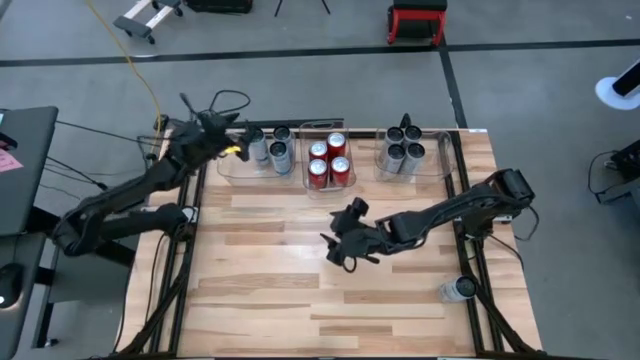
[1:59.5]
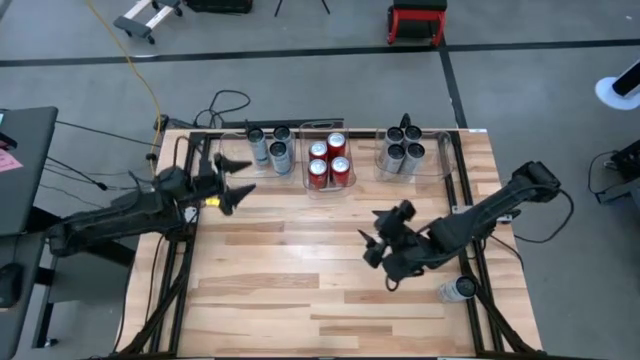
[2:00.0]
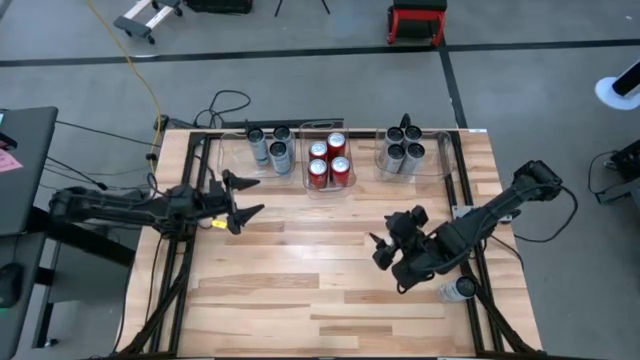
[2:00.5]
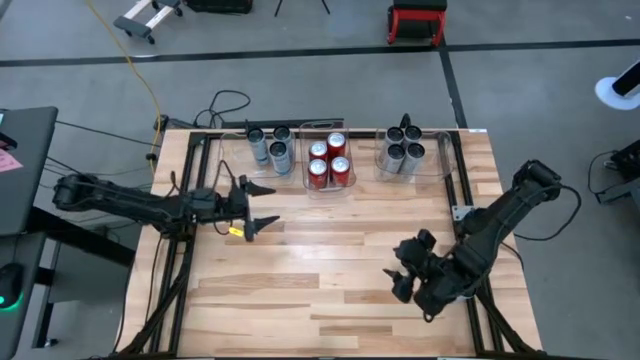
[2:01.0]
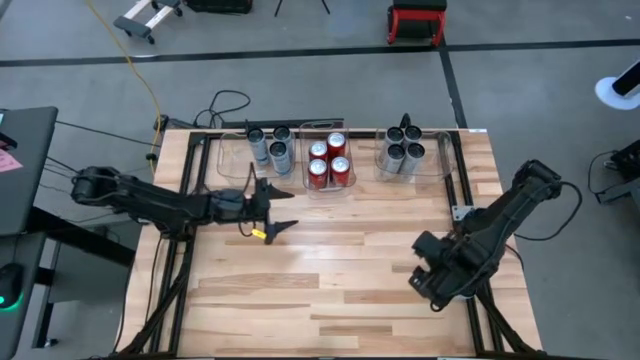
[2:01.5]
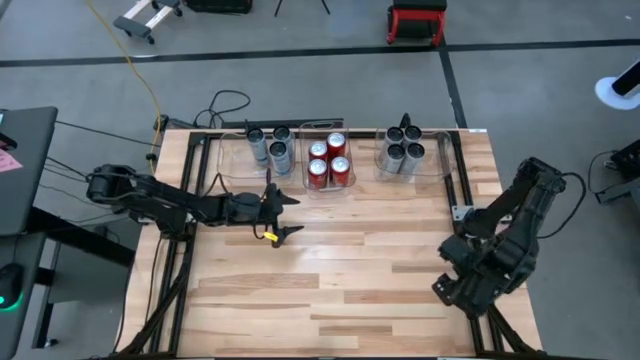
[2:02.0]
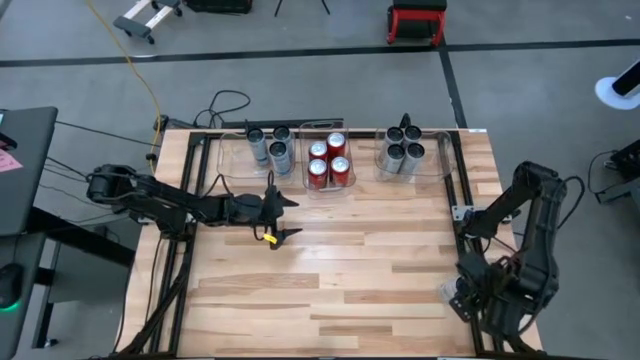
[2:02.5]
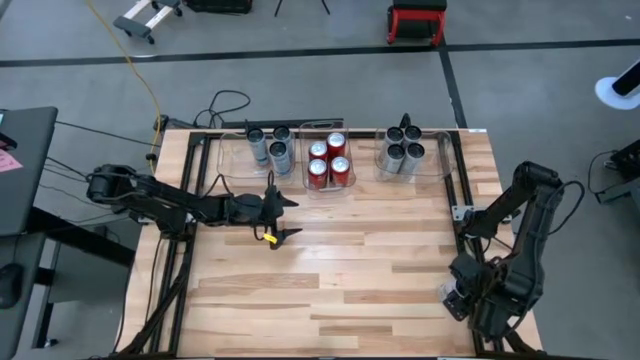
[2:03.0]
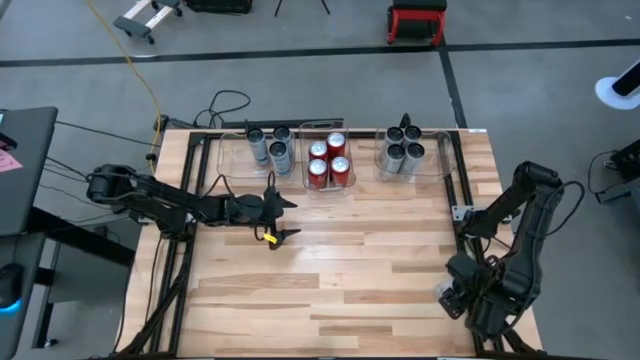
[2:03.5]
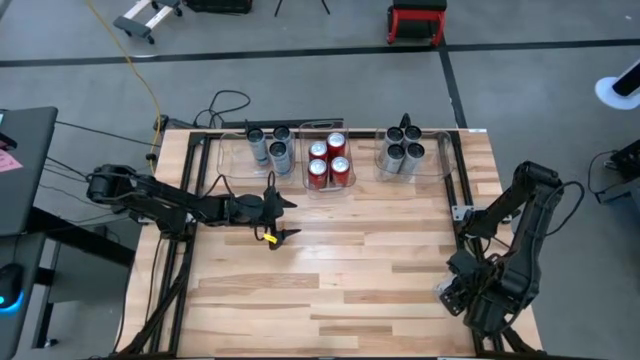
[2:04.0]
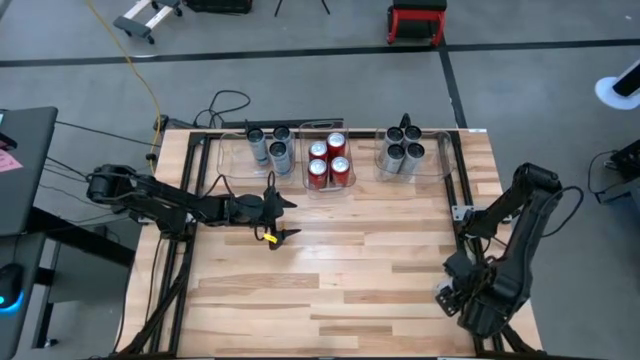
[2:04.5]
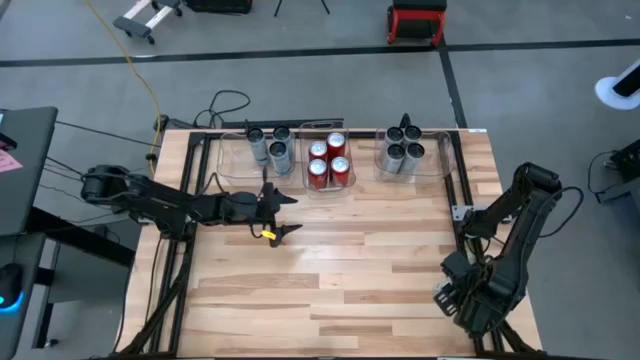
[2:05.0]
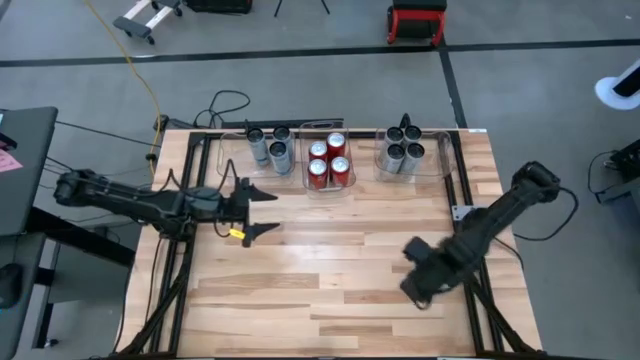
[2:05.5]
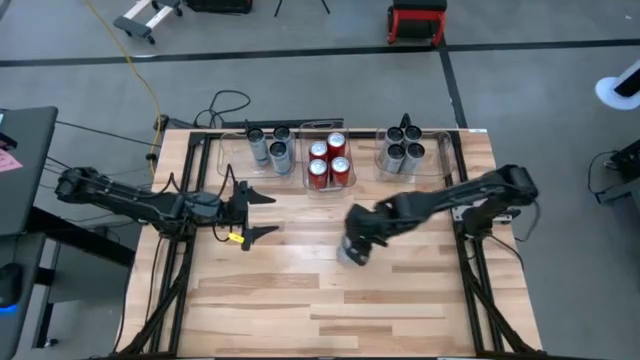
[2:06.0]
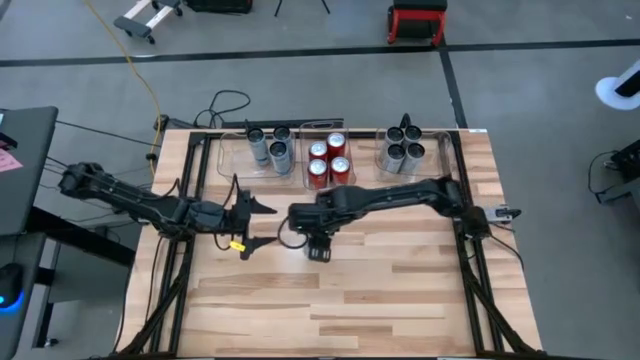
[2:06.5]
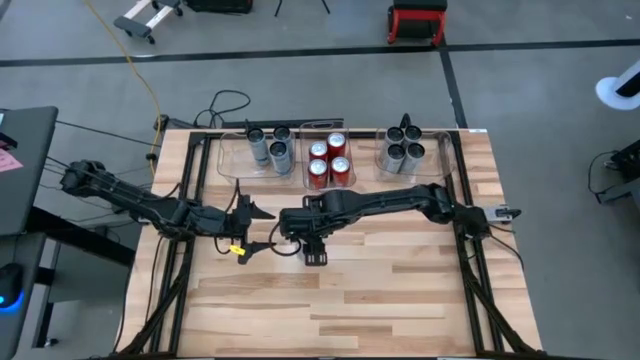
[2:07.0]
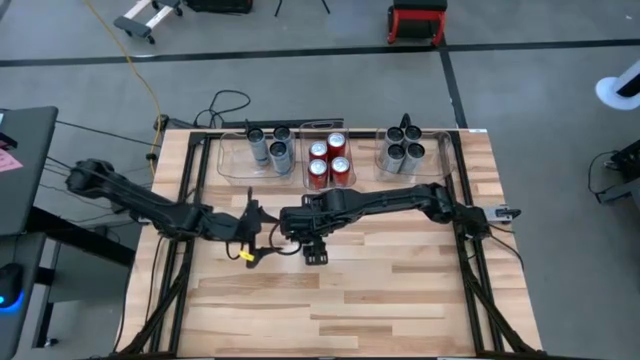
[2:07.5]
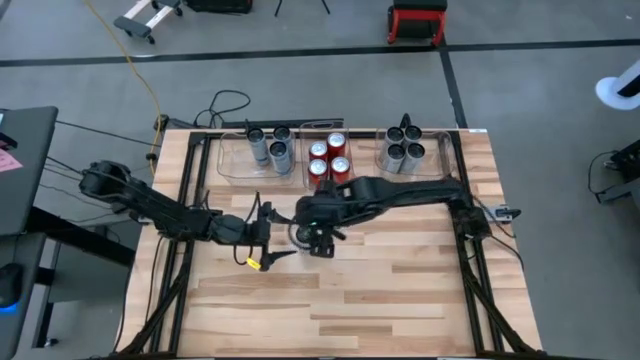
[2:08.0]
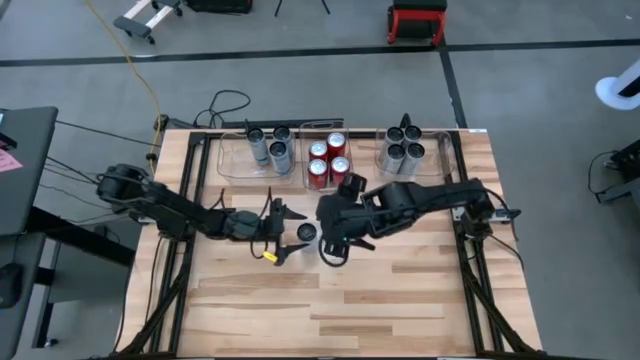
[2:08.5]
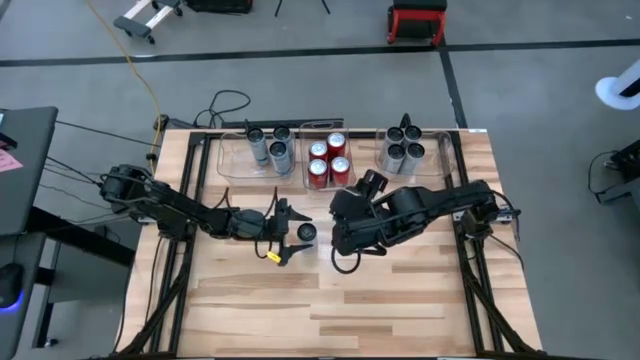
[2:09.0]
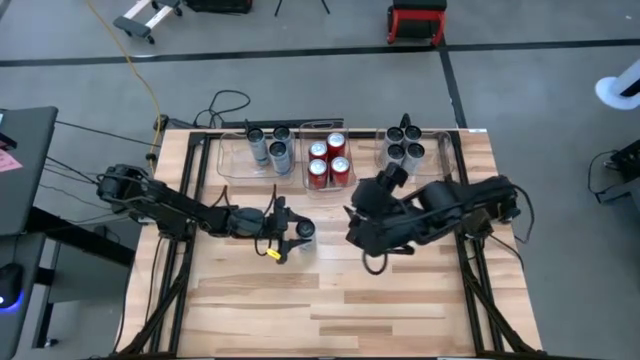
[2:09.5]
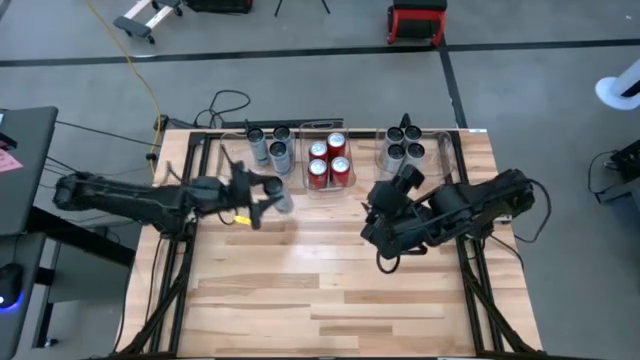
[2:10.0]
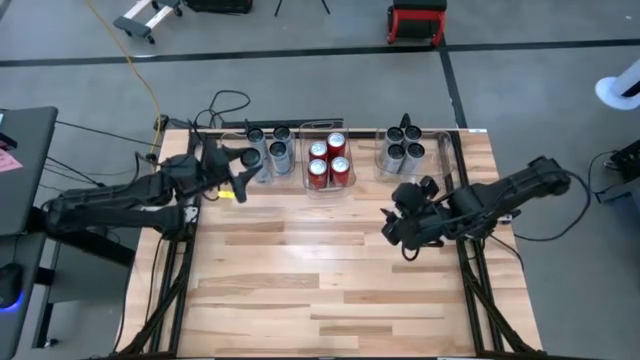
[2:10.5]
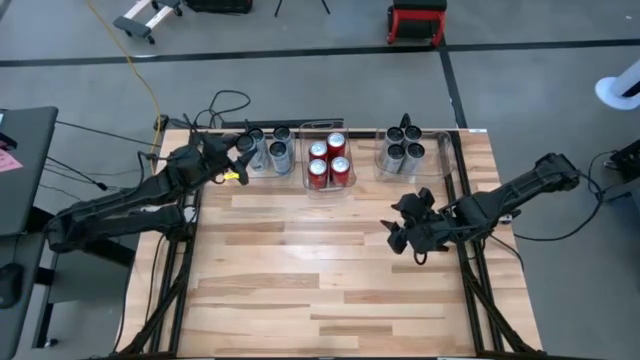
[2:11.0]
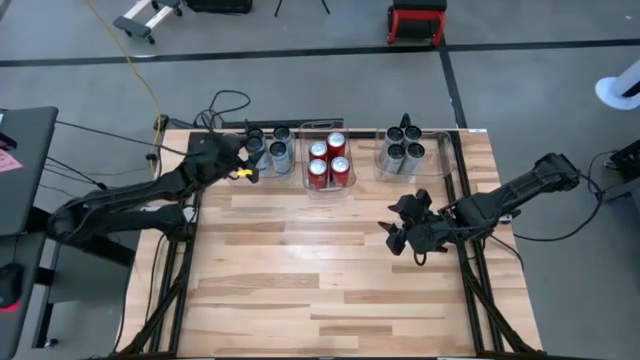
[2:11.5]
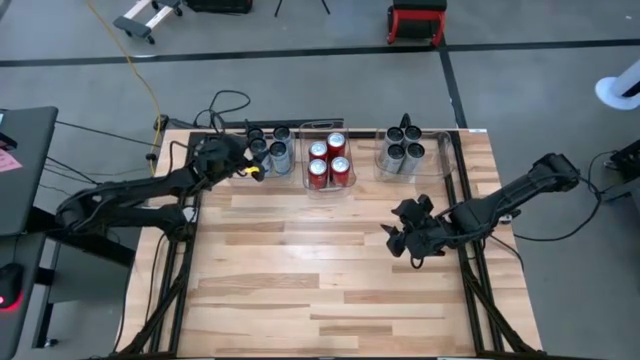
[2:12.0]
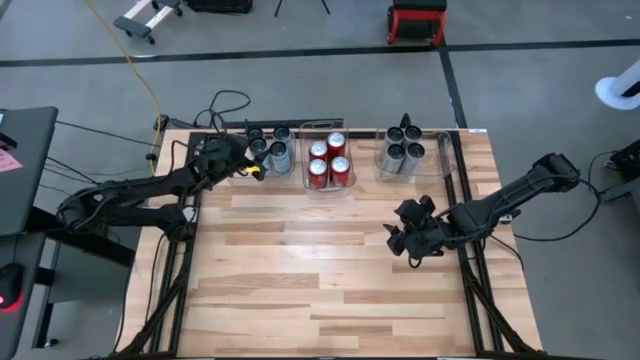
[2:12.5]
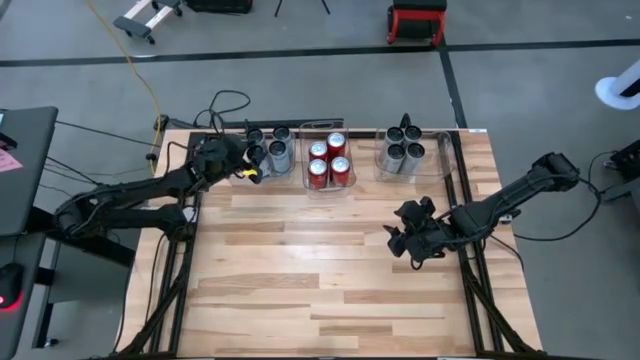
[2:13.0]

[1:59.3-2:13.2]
Task: Sort soda cans
Put the white-blue soda can into the left transparent bin

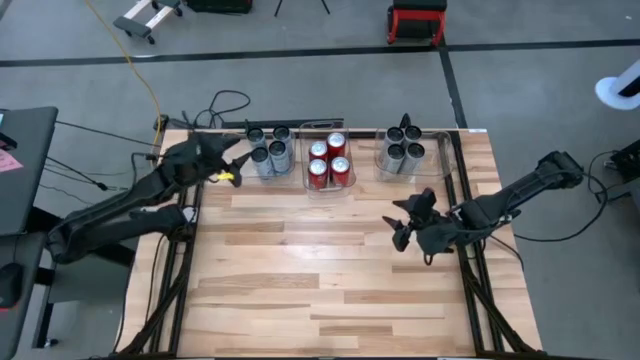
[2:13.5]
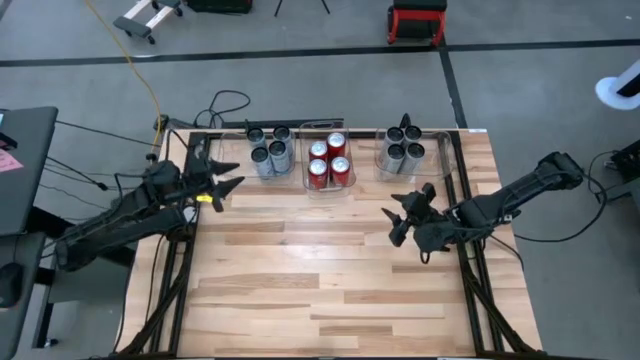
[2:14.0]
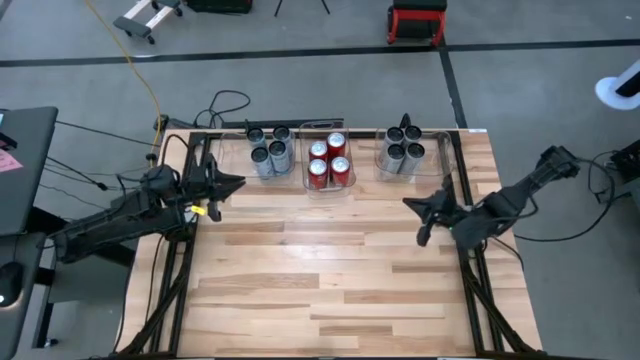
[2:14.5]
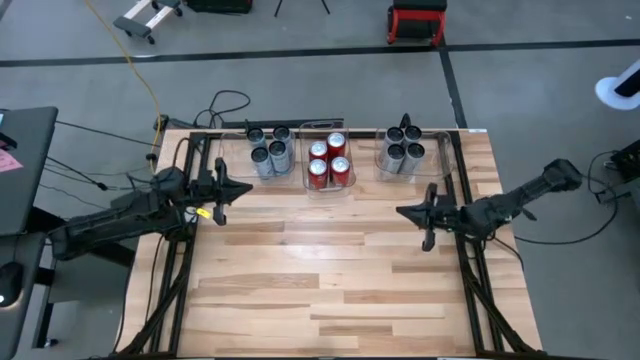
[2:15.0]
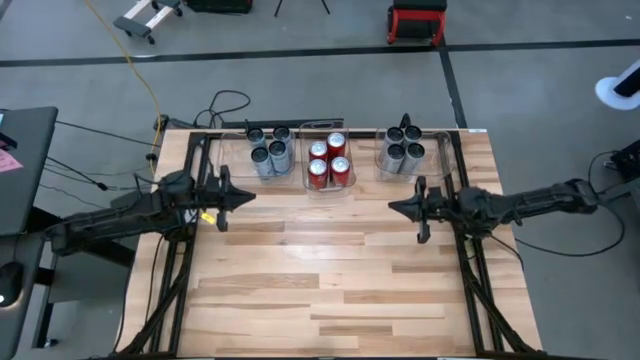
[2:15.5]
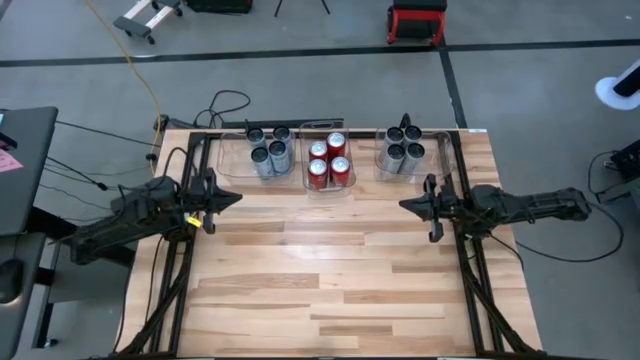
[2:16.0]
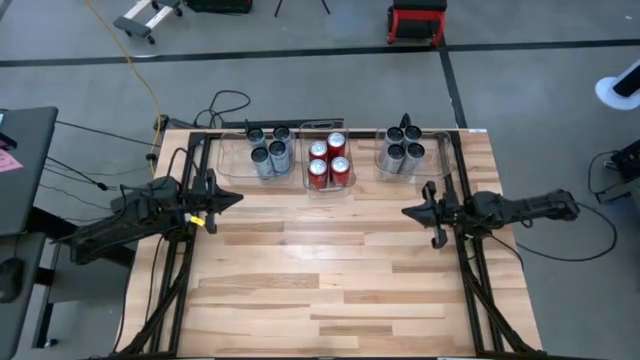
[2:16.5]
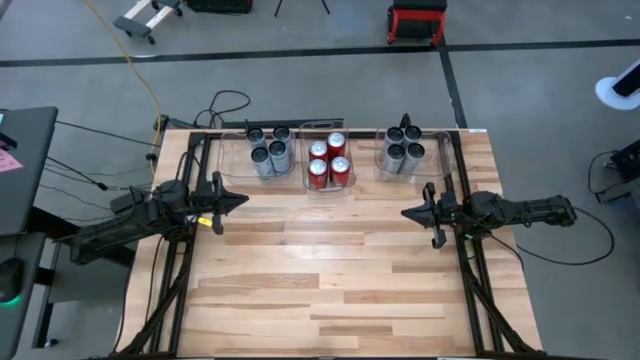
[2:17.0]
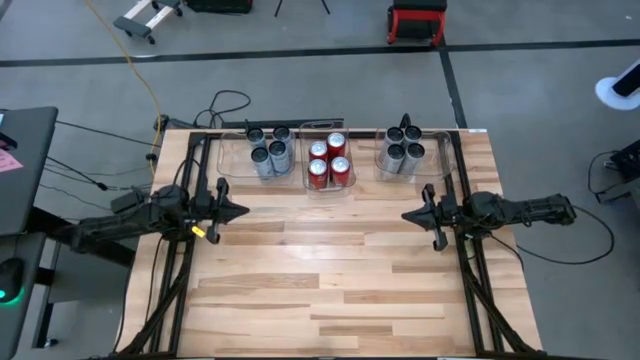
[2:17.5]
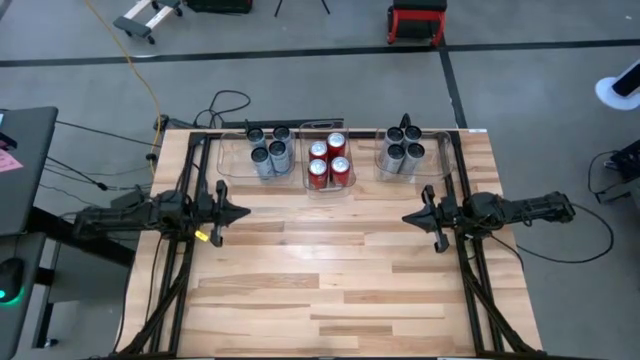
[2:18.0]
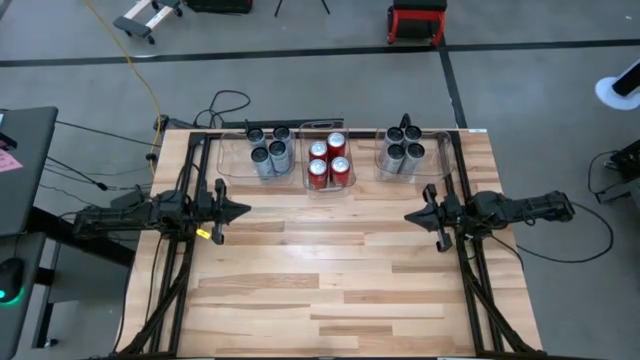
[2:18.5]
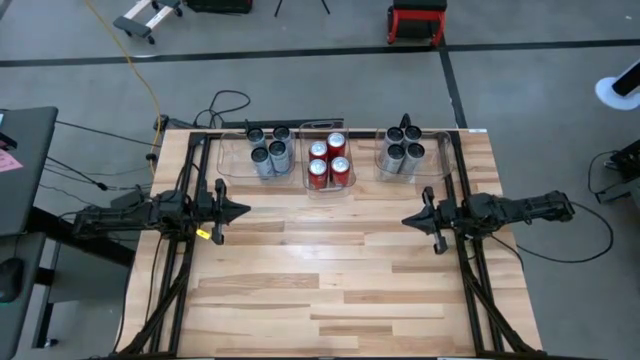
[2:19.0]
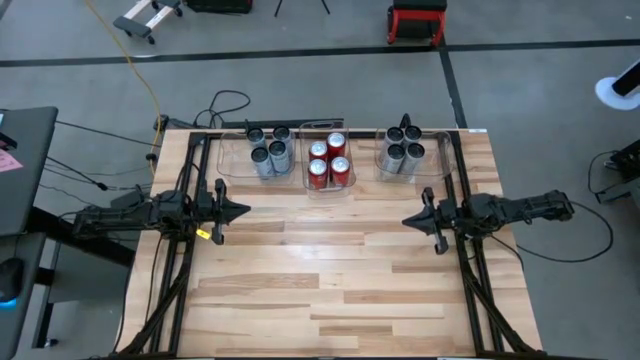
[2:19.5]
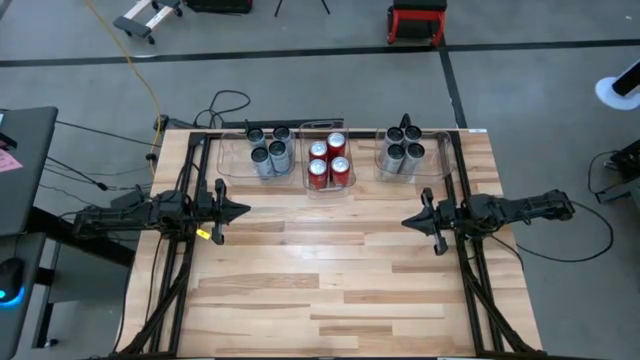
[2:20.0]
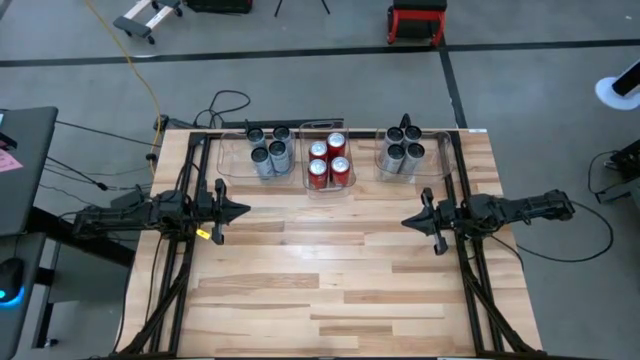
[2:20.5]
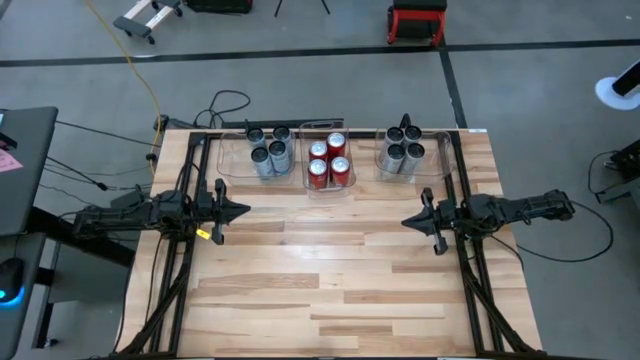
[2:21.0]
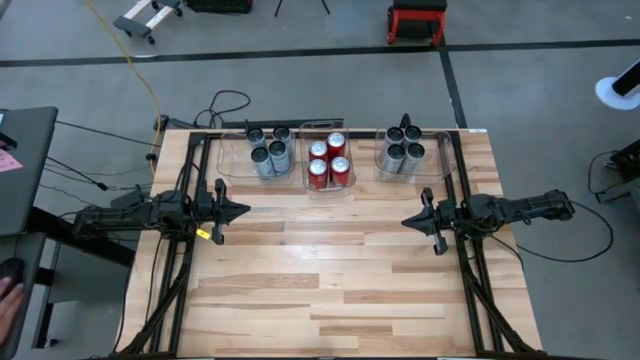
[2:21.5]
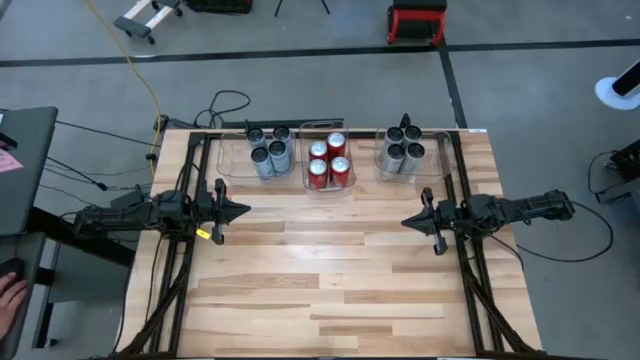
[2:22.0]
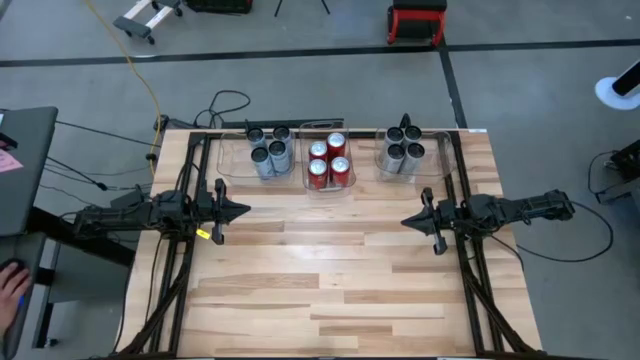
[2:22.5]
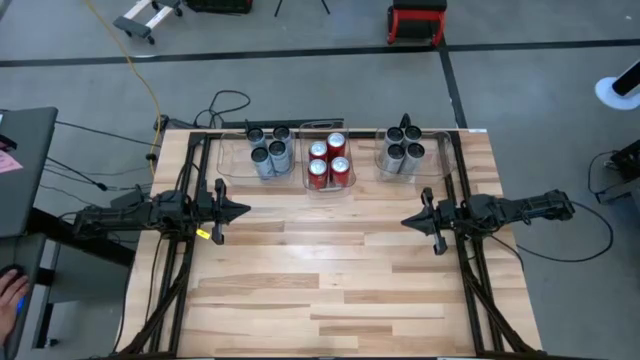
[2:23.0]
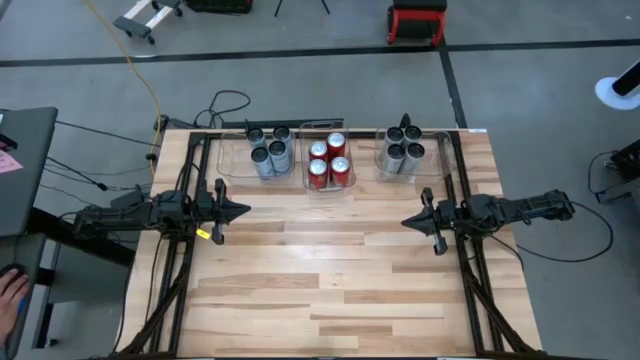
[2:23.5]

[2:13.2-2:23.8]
Return to Home Position
